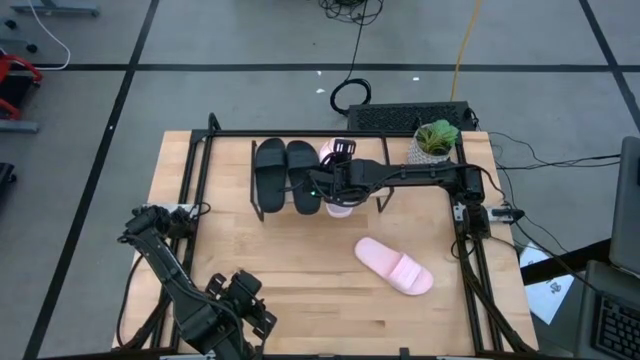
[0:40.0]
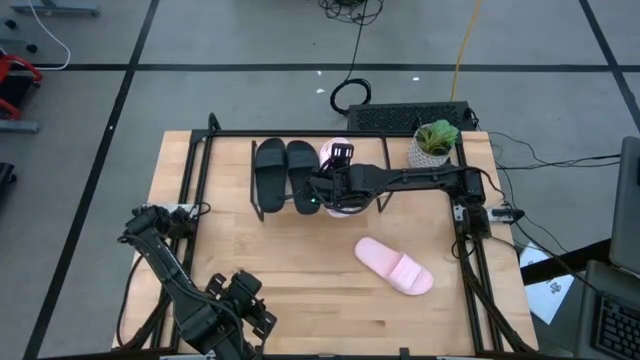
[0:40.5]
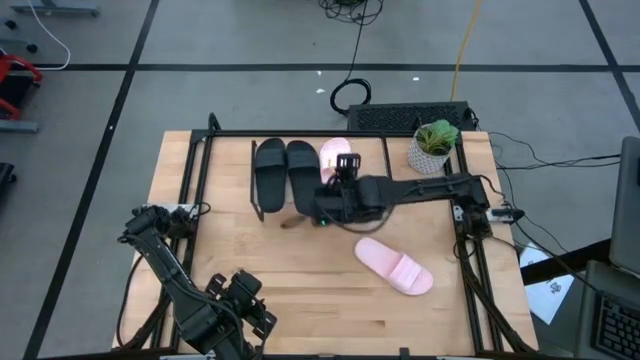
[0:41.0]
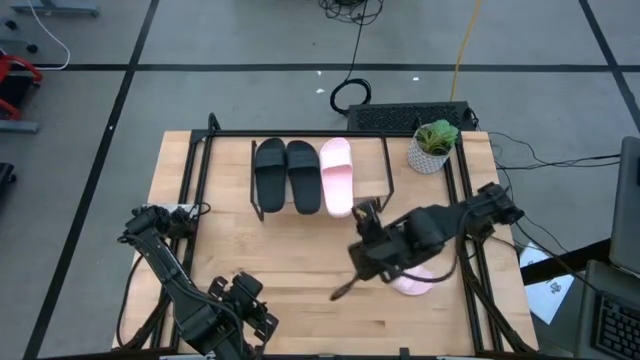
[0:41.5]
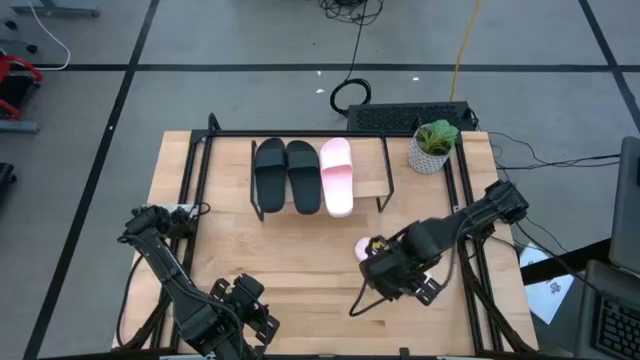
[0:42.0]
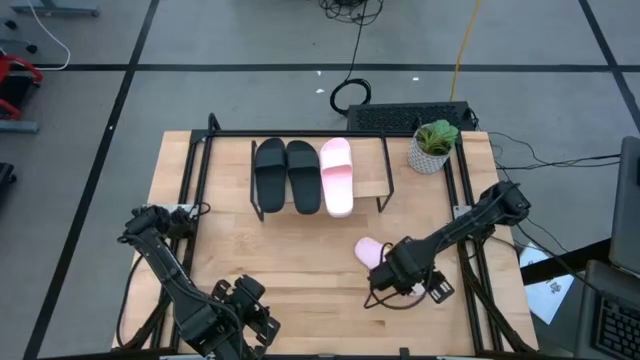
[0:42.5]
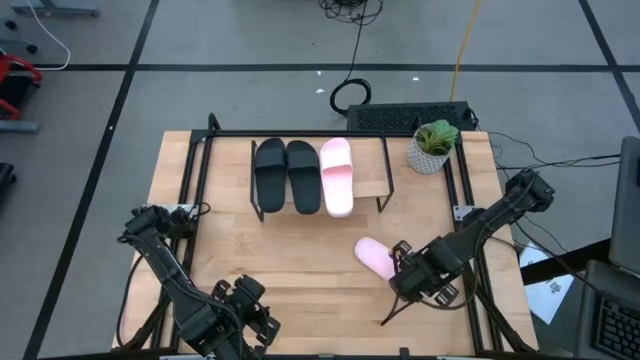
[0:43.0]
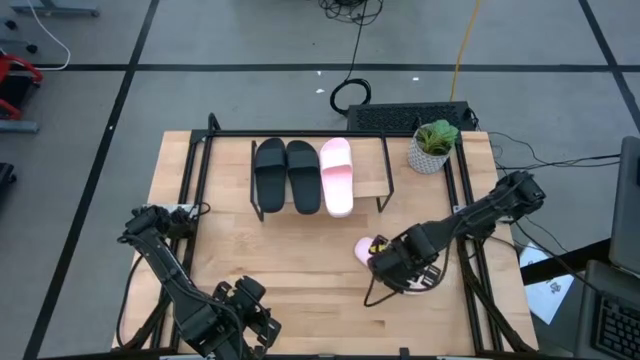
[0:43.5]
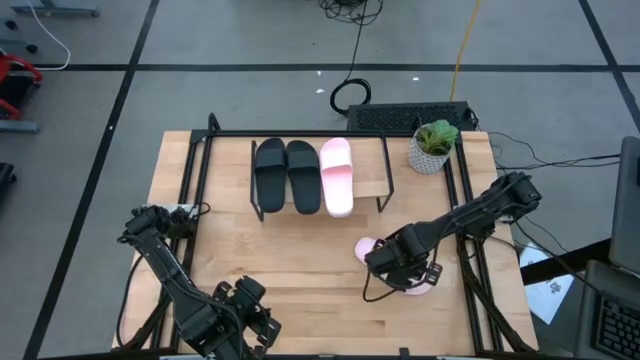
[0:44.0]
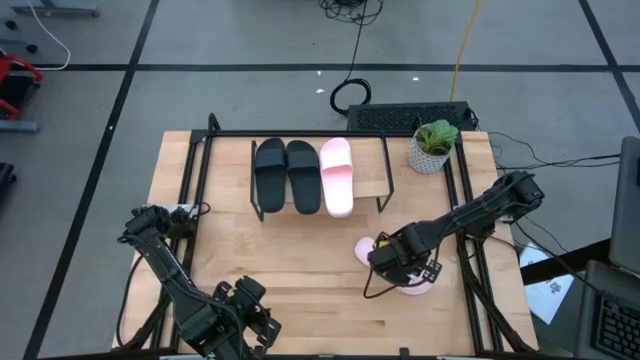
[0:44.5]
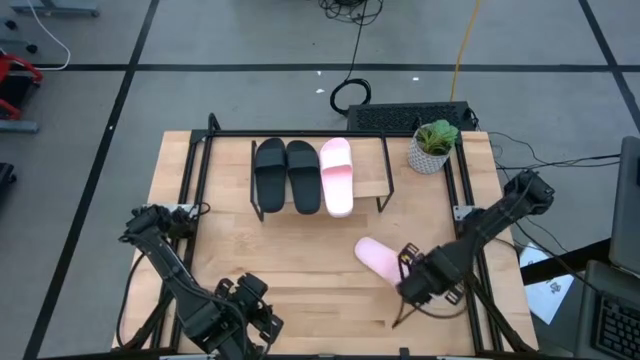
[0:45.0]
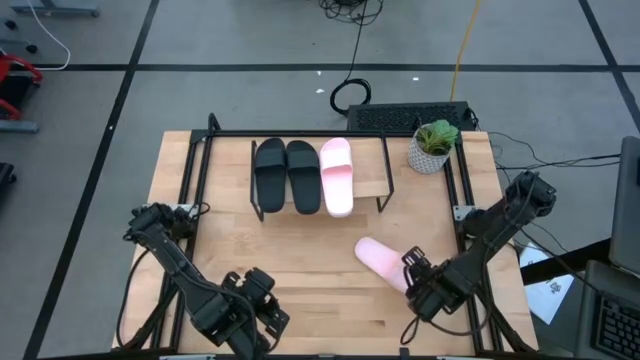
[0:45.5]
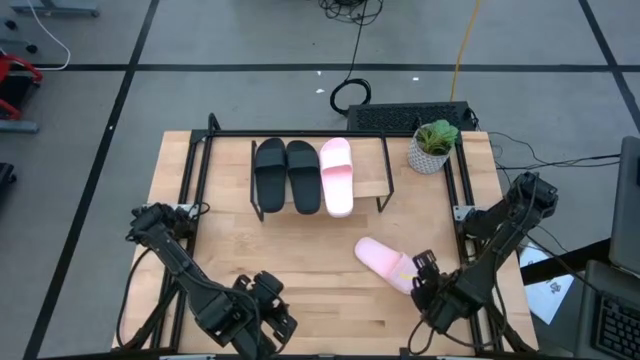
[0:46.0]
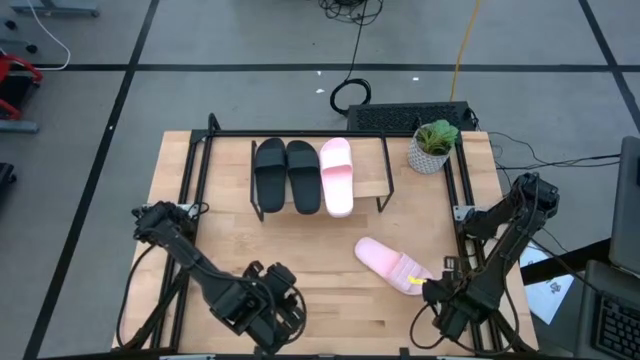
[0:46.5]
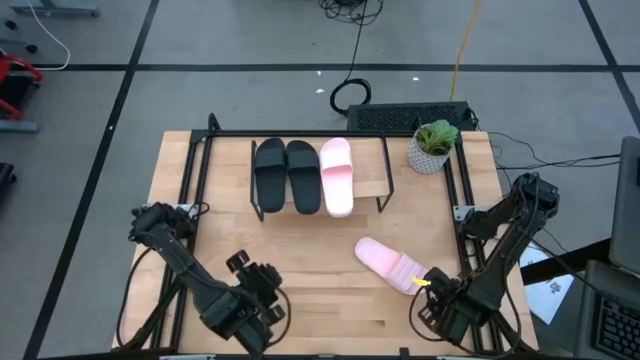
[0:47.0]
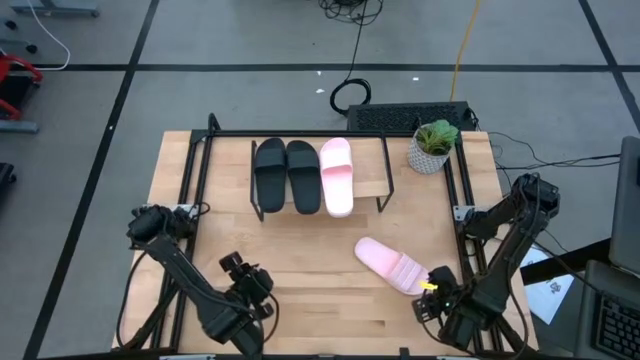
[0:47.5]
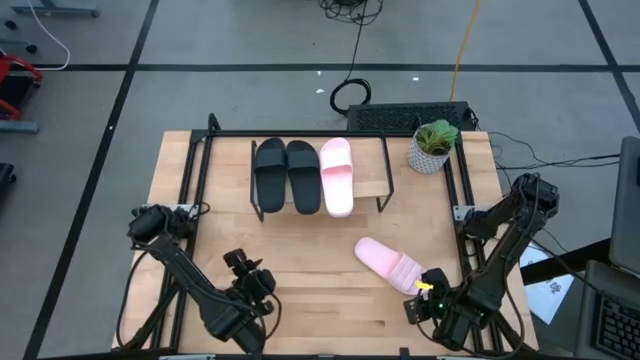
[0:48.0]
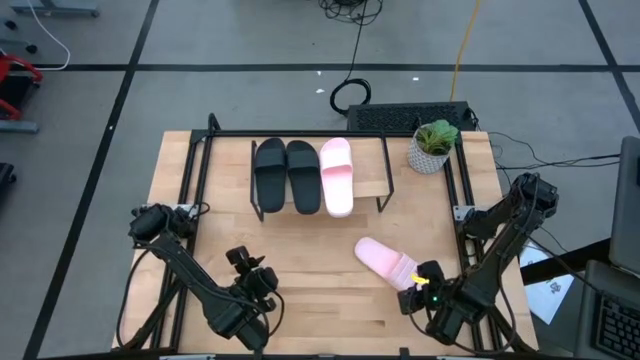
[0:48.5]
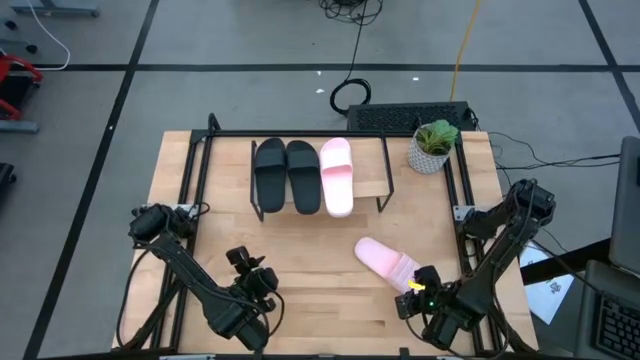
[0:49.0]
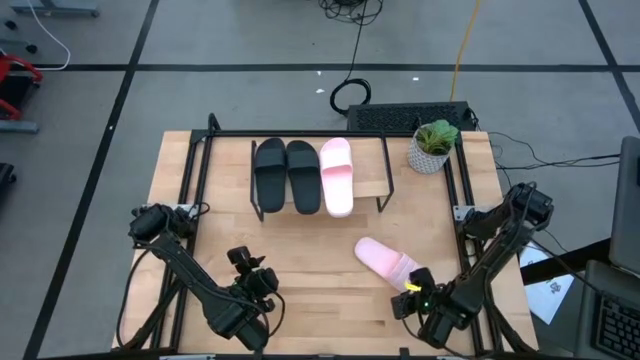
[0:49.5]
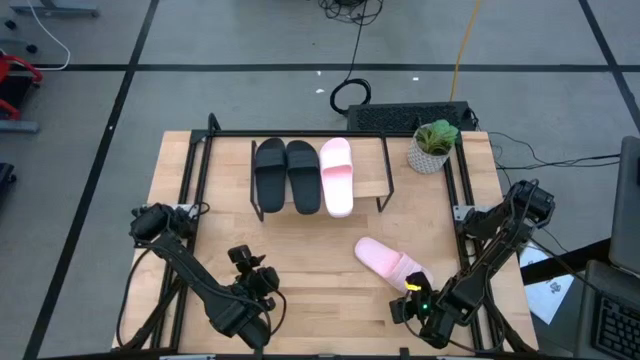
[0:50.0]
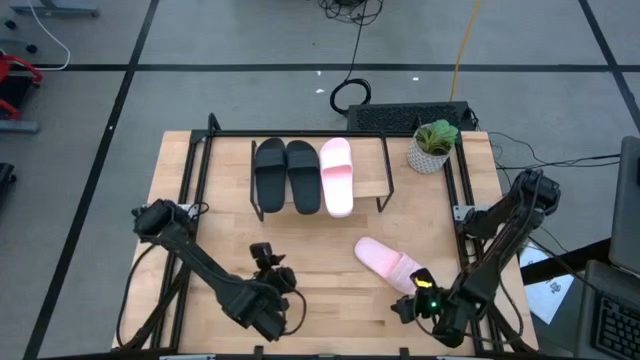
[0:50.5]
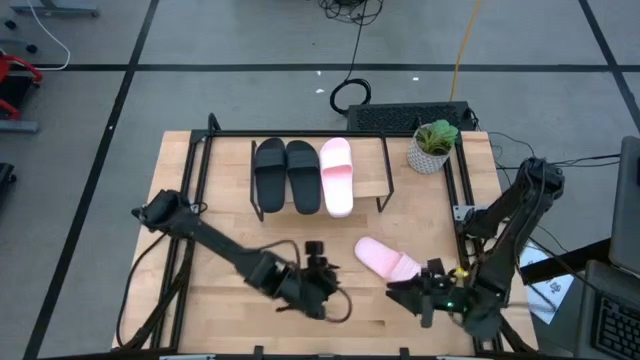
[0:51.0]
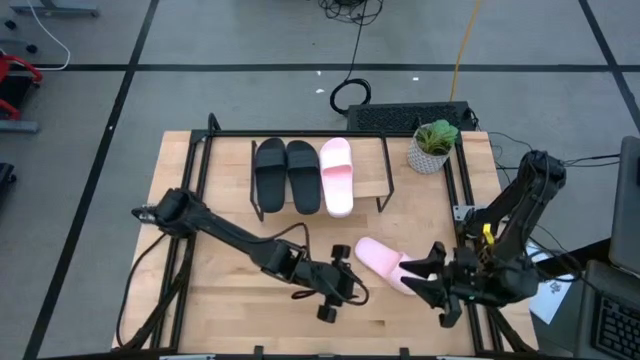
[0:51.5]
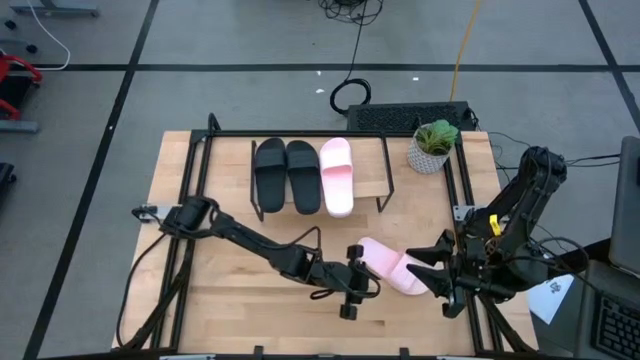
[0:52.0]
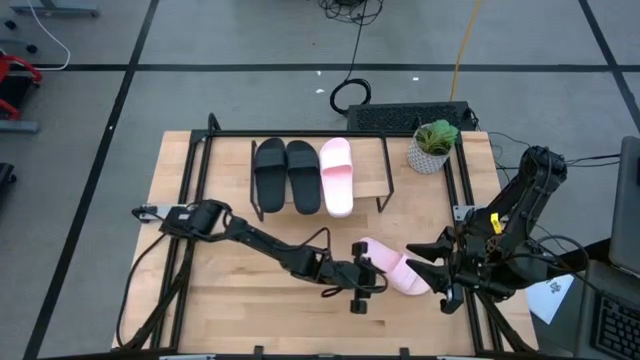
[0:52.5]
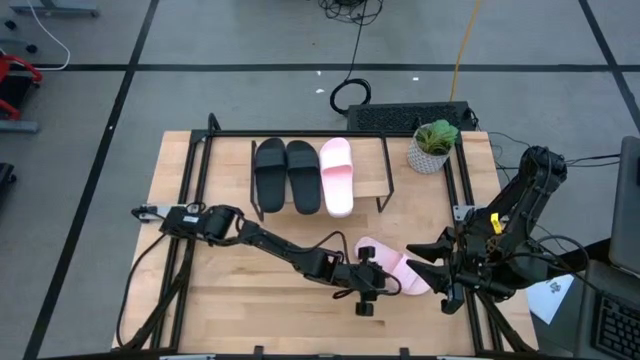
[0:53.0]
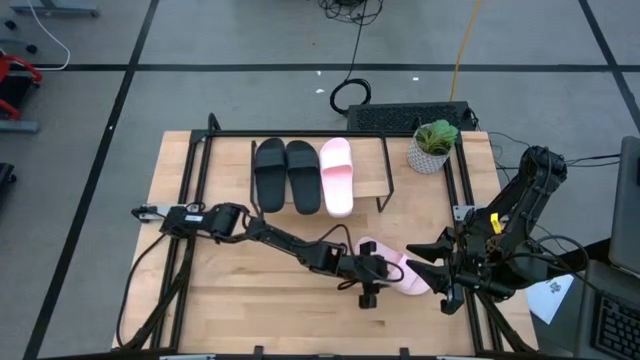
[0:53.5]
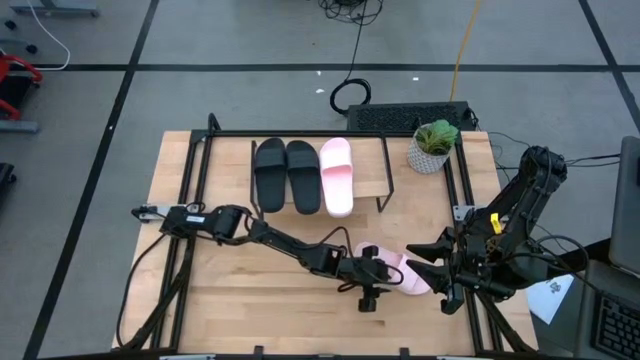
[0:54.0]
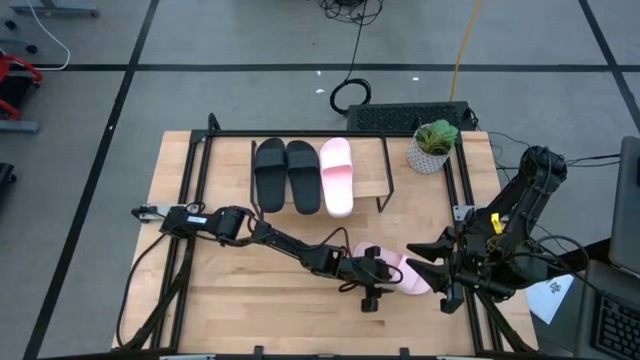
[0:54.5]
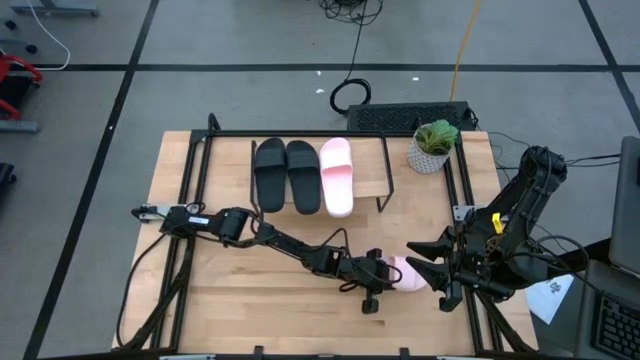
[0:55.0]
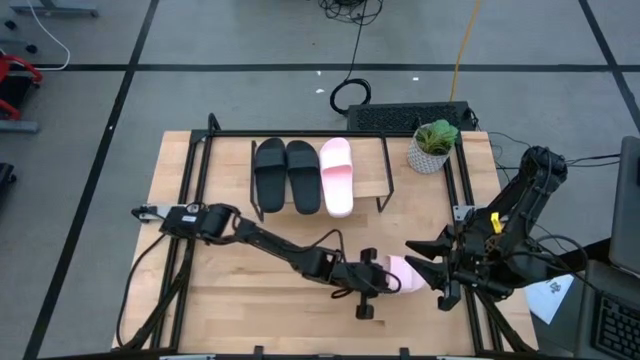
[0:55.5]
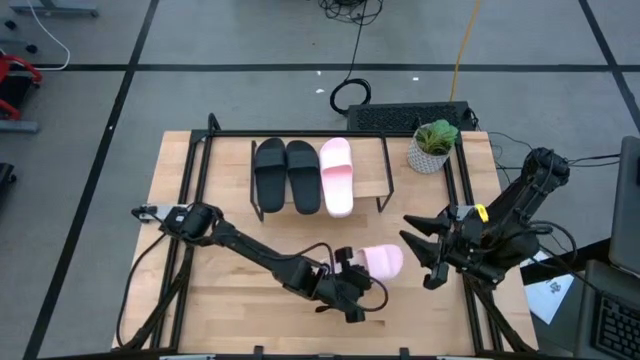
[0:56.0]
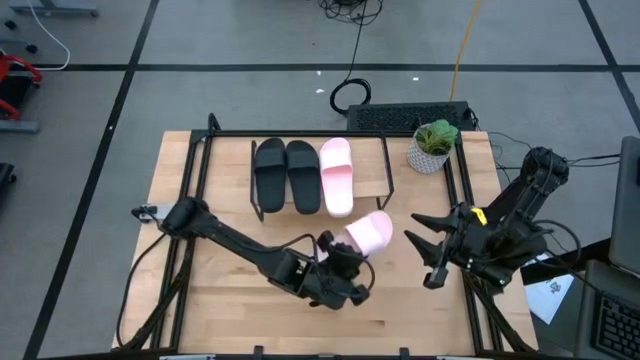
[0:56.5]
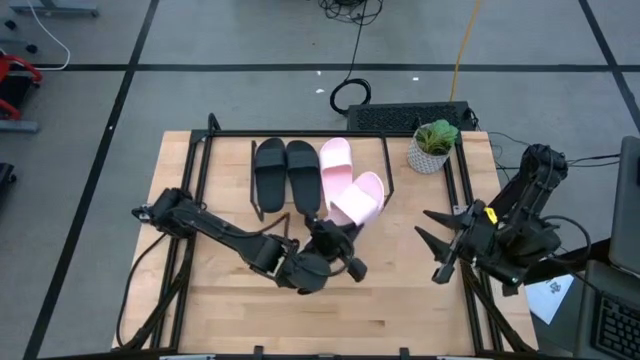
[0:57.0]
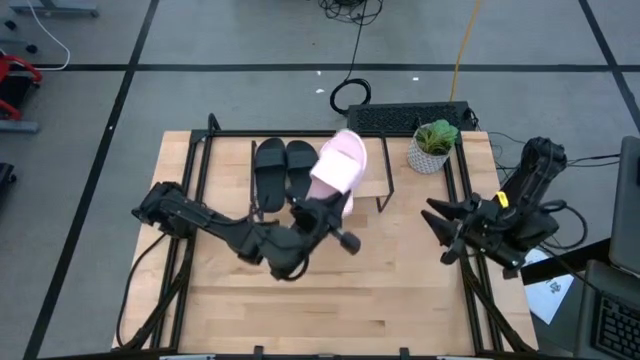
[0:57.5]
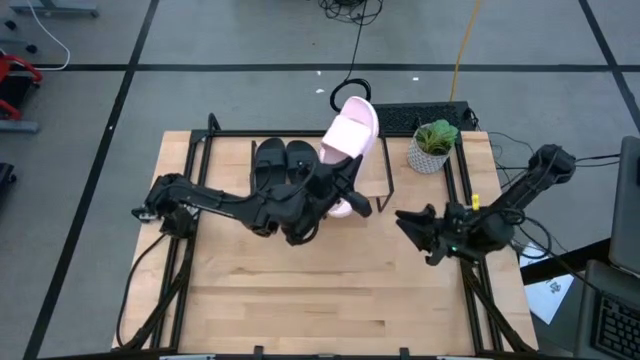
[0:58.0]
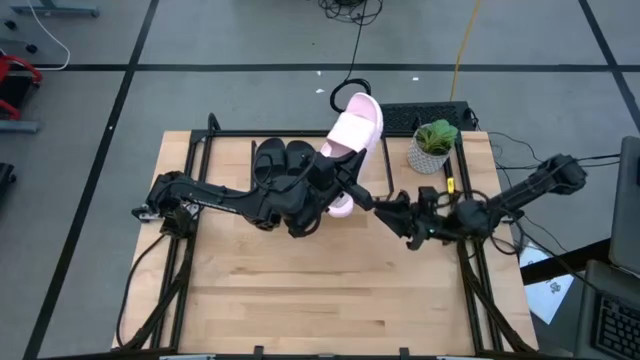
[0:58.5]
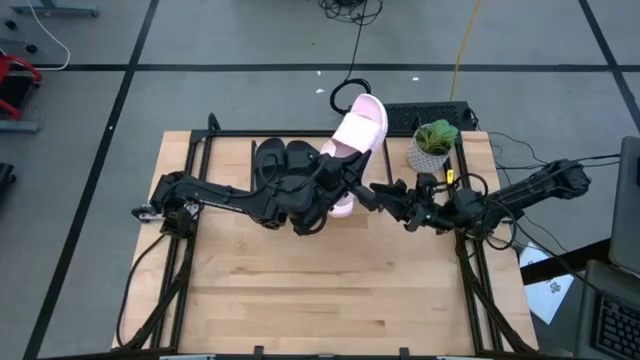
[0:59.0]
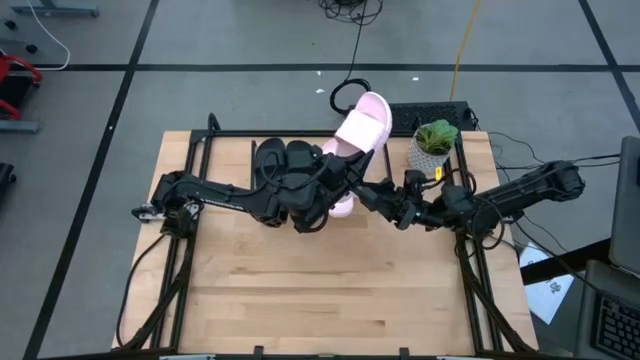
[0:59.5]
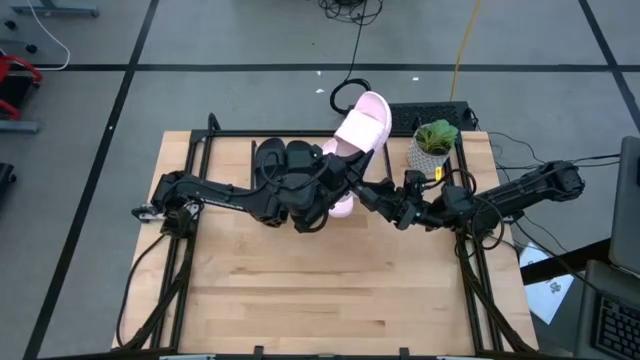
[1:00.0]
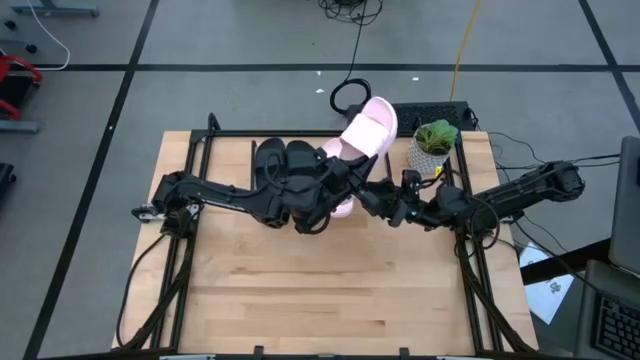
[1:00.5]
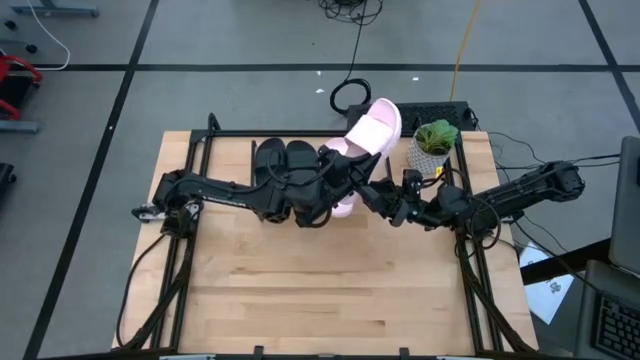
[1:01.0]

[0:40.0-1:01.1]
Task: Pick and place slides into the shelf
Put the pink slipper onto the shelf
